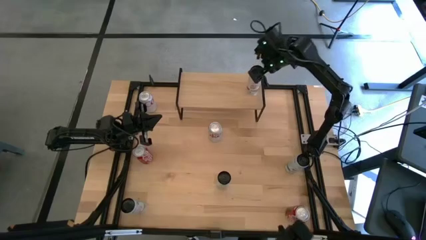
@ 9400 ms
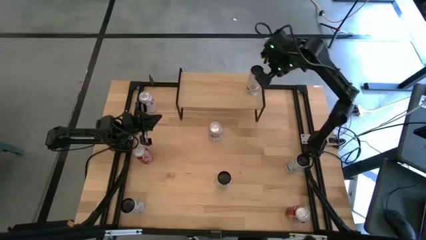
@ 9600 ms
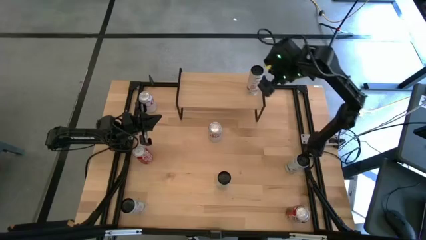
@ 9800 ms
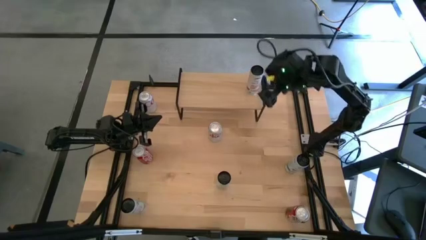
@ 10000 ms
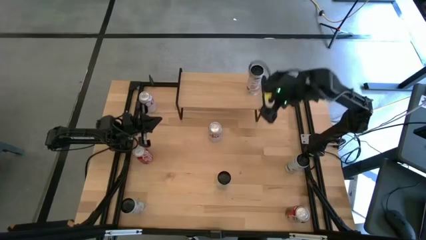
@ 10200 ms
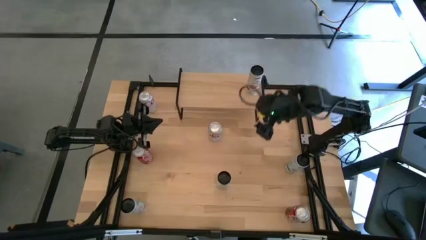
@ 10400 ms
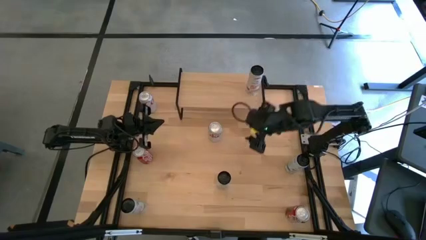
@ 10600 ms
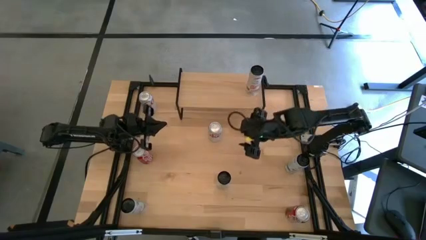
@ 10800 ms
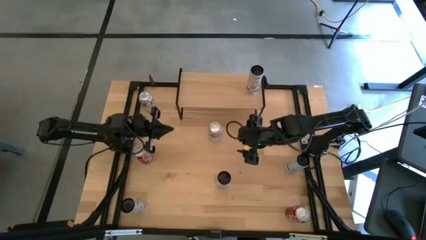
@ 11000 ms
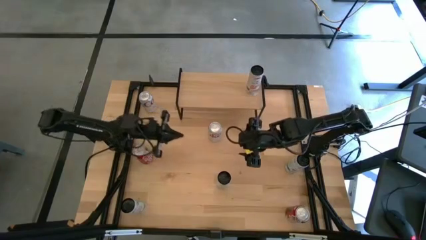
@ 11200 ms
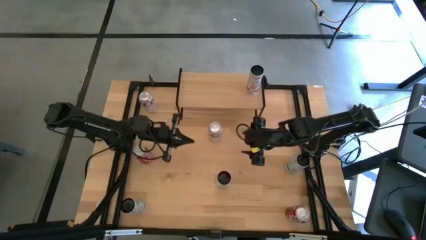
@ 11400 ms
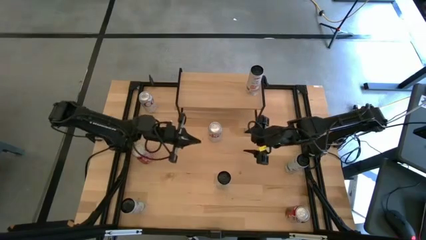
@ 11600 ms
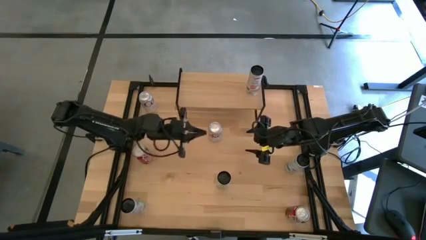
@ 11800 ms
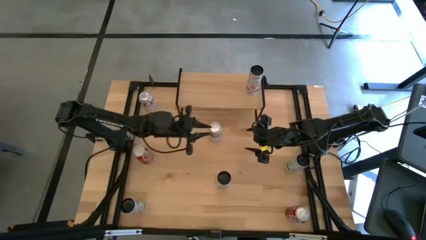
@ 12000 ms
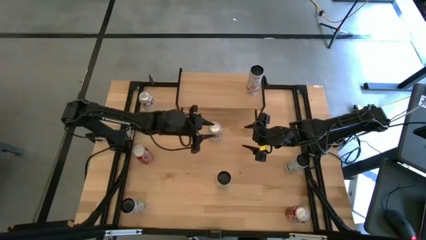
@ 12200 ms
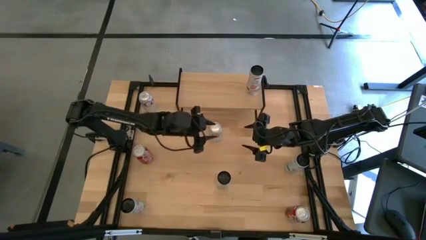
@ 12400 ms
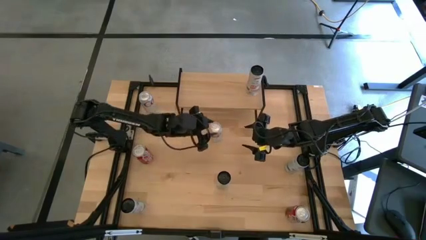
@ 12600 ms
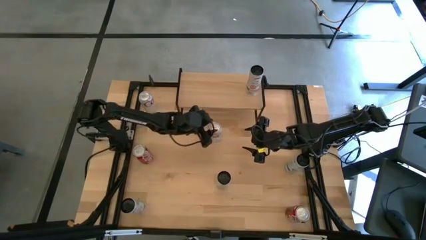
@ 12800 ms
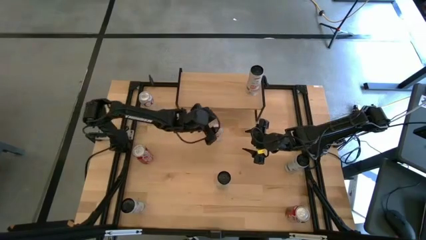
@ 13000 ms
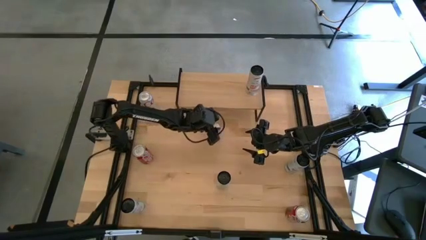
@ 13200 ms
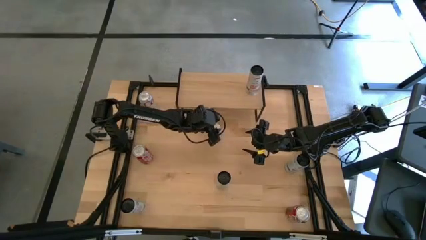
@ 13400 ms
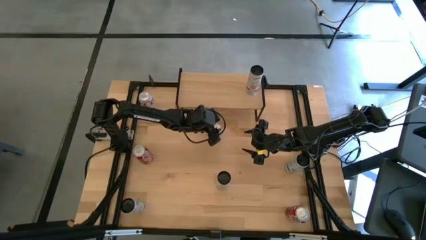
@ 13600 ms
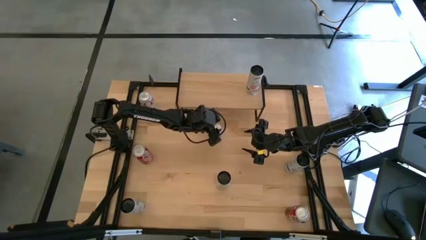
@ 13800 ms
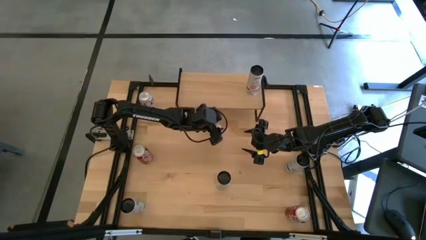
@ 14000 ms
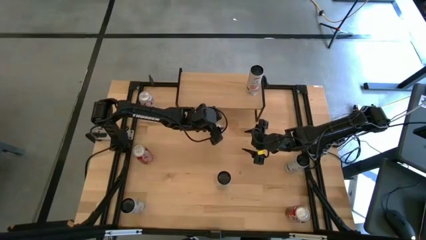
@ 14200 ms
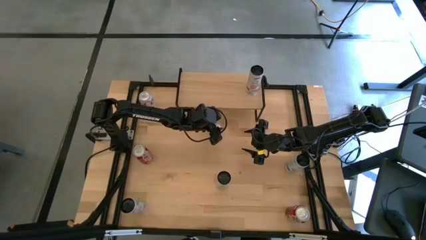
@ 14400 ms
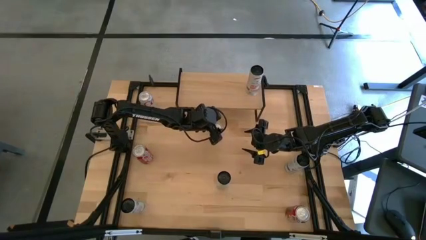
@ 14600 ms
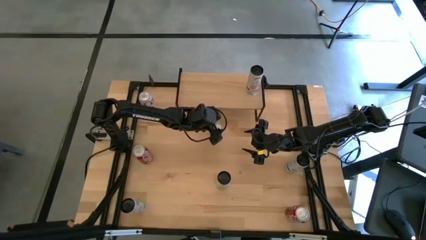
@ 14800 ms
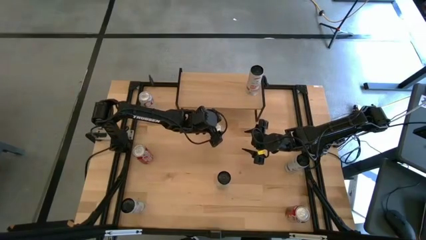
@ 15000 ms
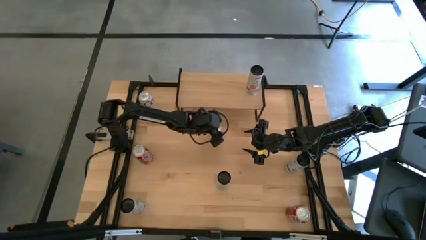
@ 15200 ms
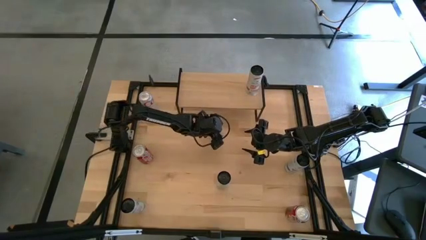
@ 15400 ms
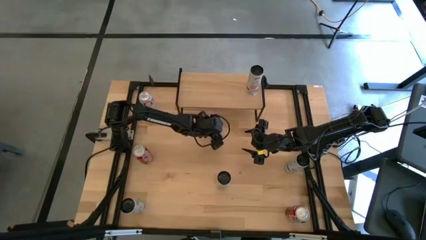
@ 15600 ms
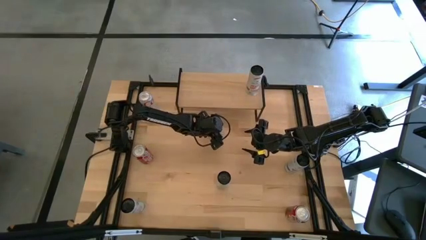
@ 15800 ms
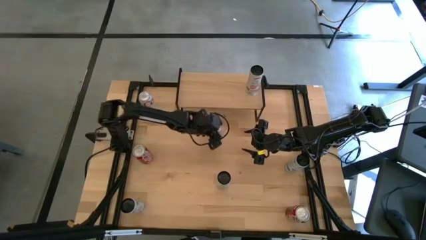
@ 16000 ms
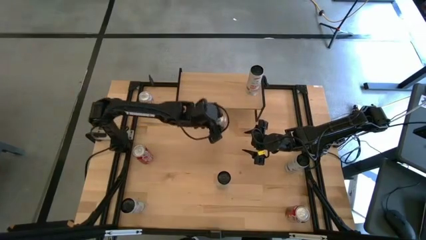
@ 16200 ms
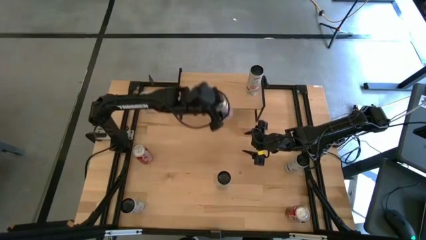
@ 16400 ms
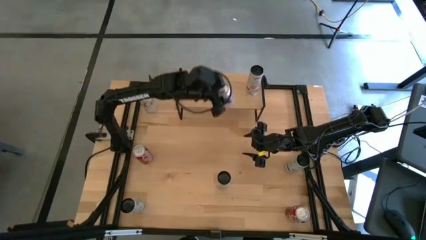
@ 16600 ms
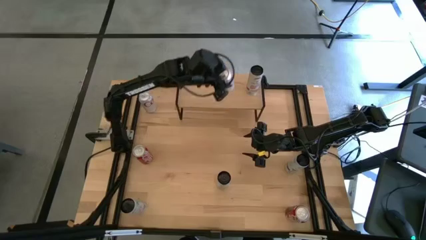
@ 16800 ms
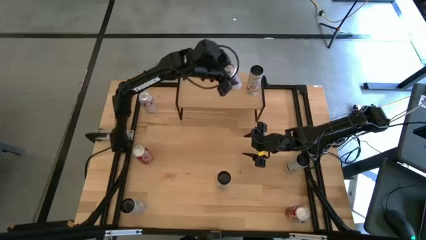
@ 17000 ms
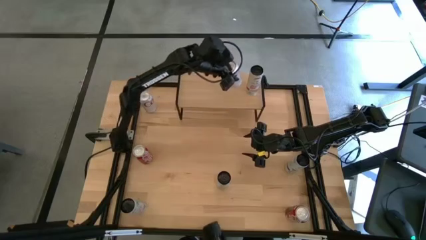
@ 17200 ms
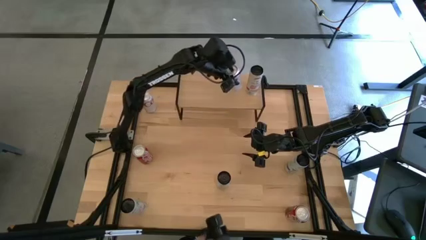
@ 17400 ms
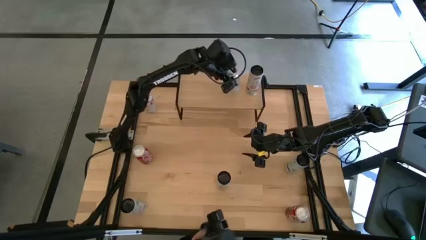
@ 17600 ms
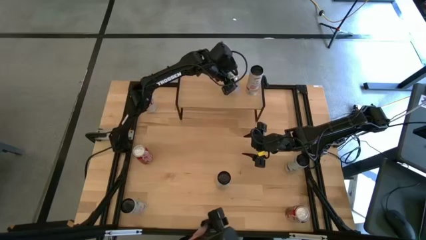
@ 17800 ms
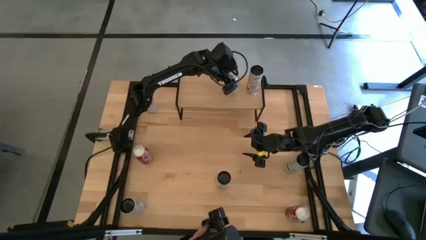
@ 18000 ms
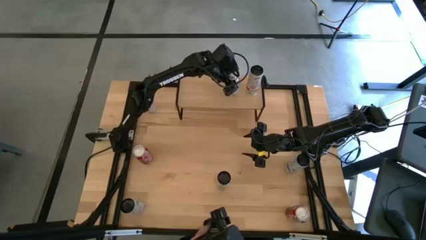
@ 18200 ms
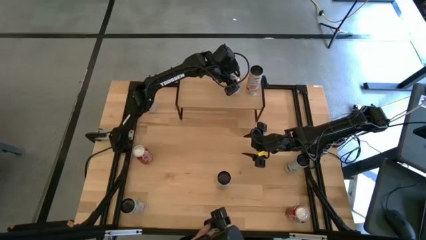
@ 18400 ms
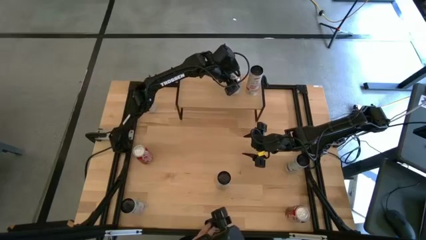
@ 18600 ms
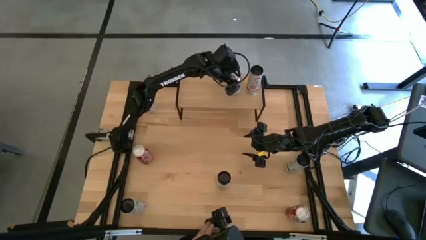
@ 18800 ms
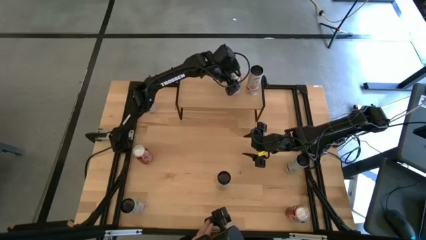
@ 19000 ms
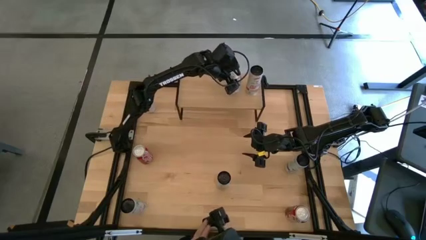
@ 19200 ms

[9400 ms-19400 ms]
Task: Place canned beverage on shelf
Put the right red-silver soda can on the shelf

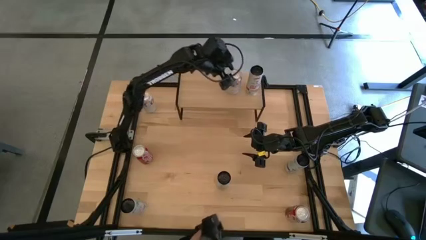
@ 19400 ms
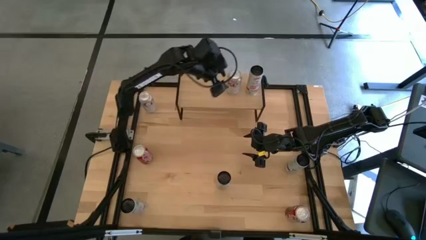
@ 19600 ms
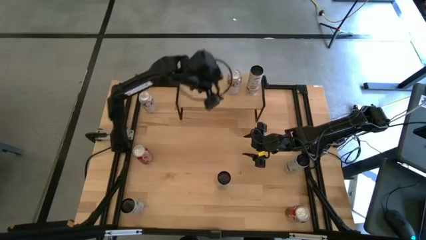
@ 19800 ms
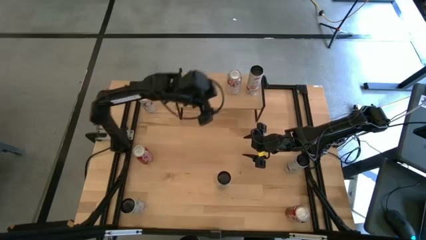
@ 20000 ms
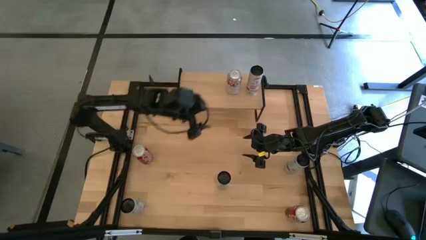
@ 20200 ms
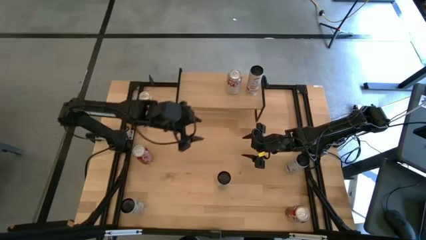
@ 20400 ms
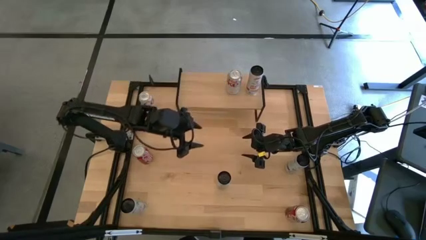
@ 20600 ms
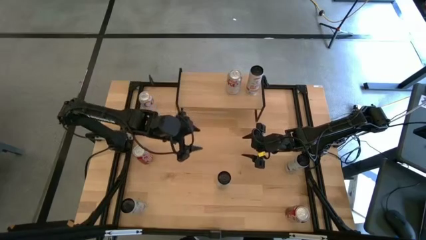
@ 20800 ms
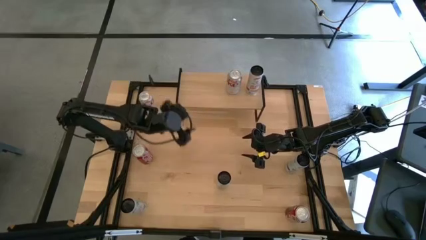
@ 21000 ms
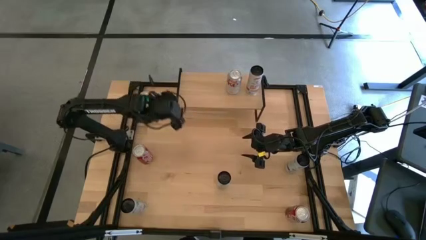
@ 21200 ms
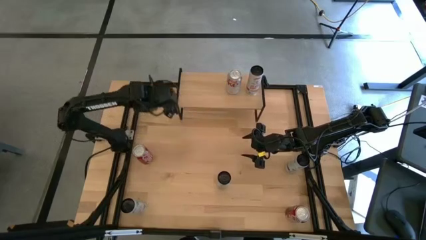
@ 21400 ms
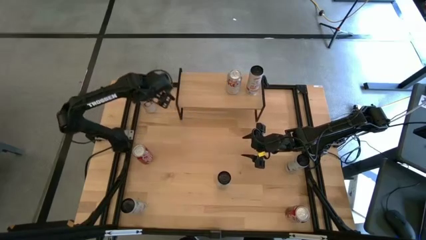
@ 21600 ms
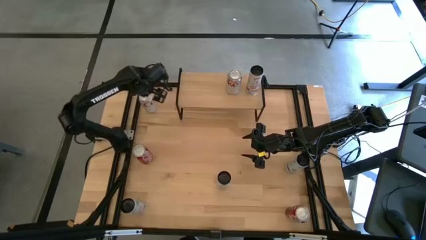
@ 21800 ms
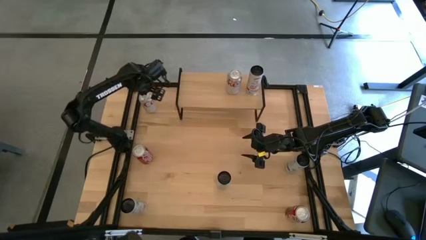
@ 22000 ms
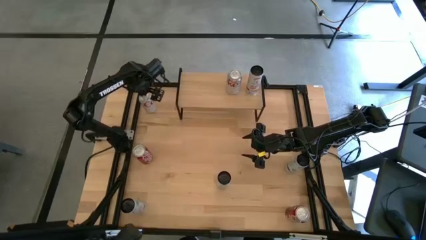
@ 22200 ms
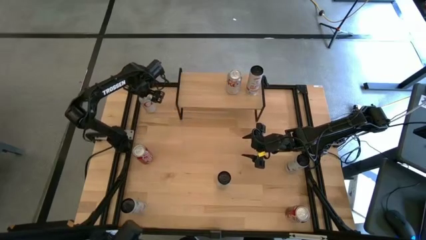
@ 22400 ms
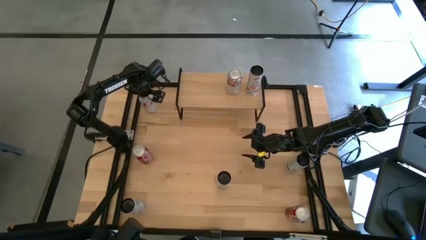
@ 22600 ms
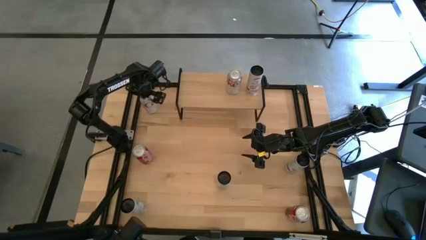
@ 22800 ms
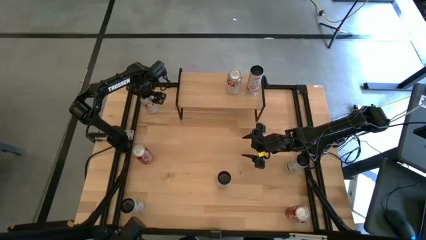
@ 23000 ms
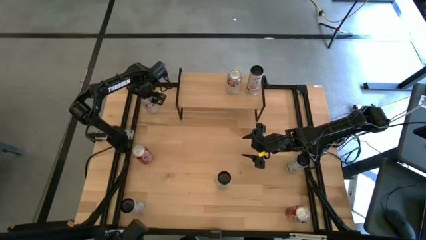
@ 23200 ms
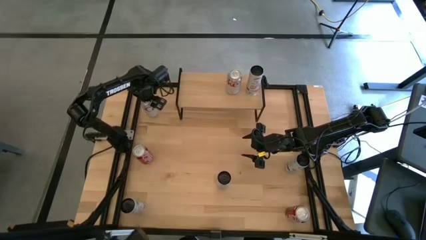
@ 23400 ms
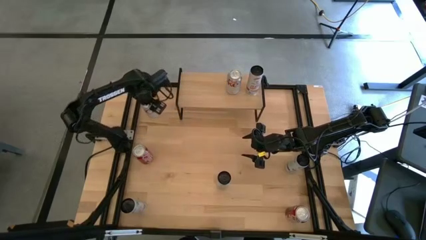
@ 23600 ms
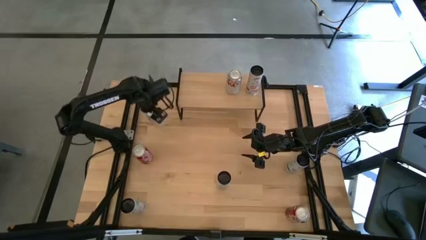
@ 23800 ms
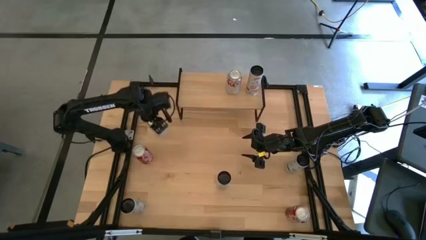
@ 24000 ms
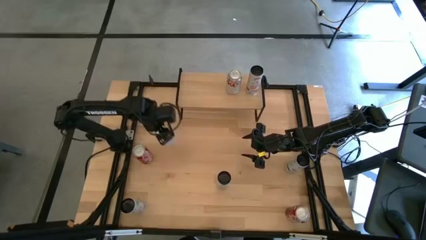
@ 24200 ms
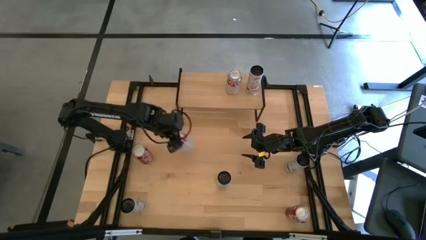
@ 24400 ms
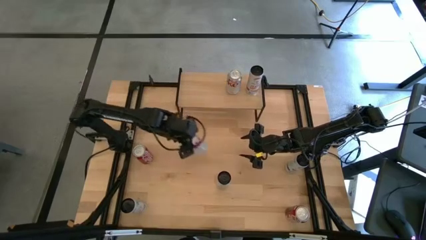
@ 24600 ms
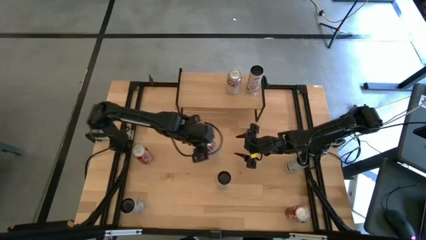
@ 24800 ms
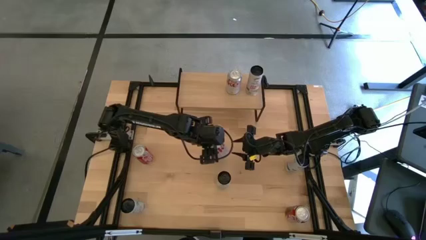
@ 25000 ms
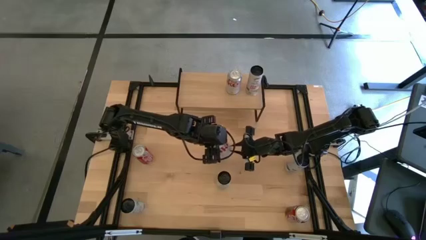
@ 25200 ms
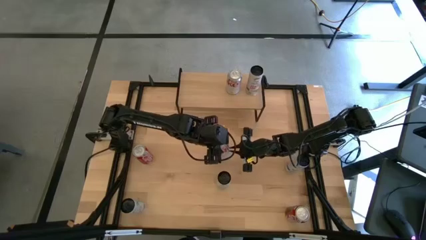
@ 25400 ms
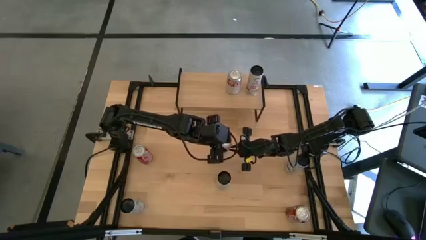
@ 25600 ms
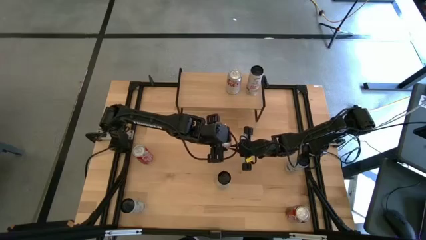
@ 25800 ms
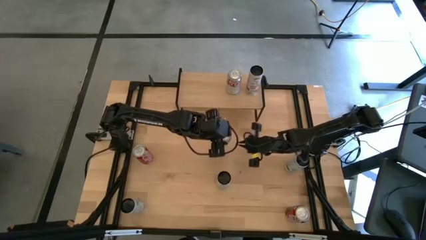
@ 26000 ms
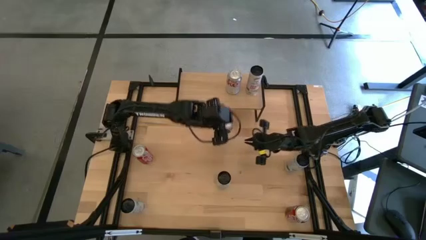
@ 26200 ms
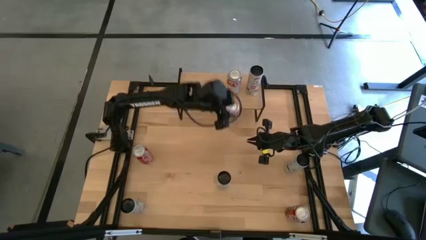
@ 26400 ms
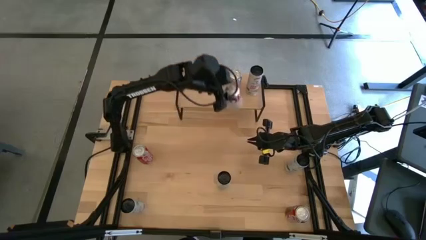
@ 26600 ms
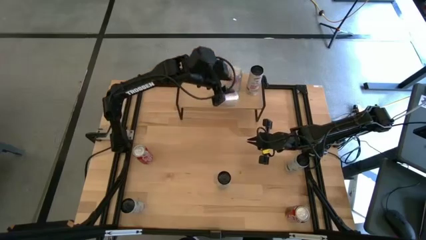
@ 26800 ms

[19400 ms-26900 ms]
Put the red-silver soda can on the shelf aligned with the other red-silver soda can
